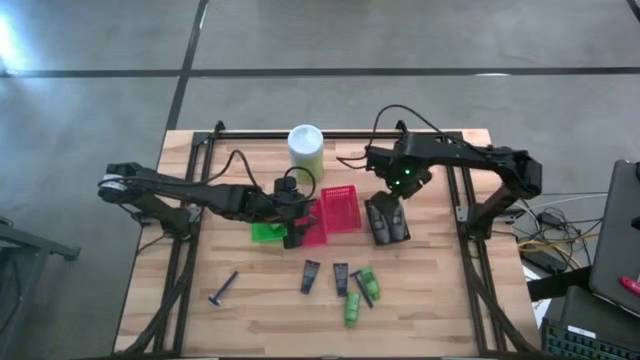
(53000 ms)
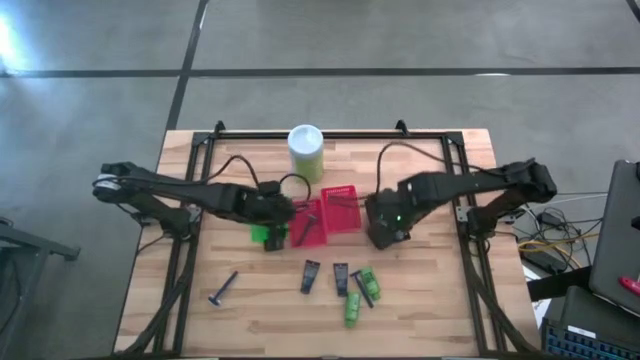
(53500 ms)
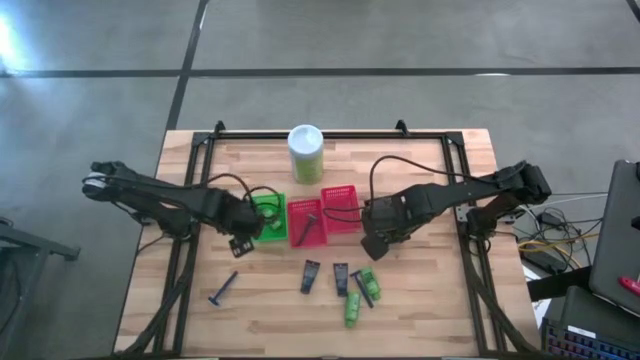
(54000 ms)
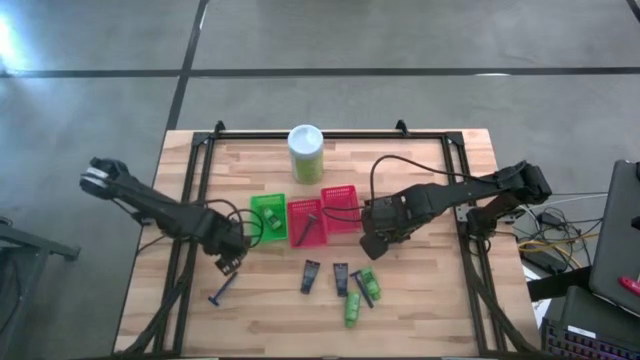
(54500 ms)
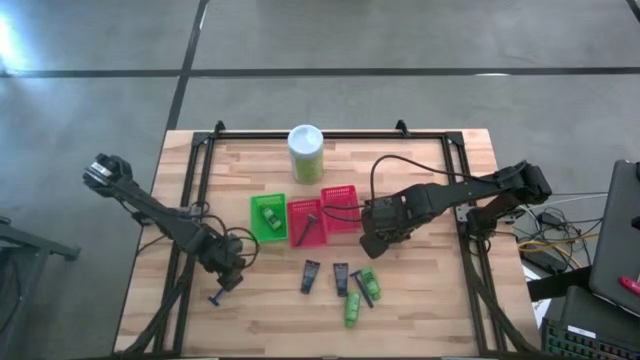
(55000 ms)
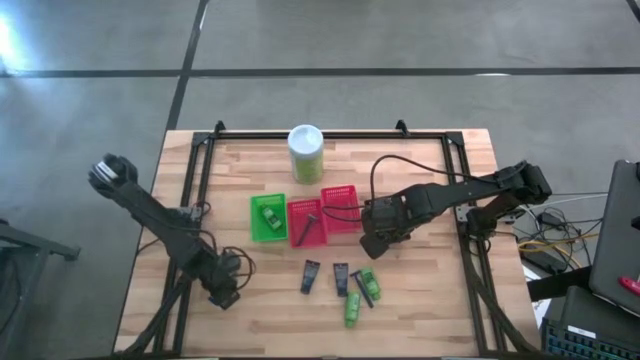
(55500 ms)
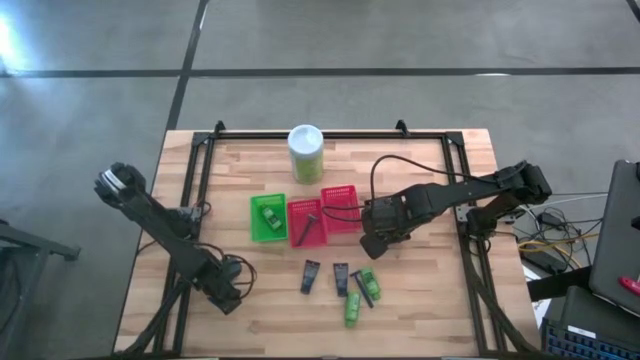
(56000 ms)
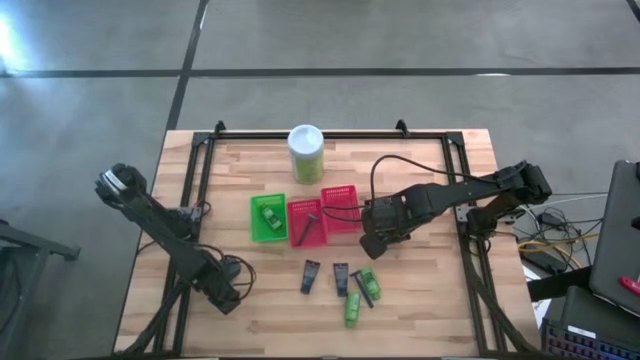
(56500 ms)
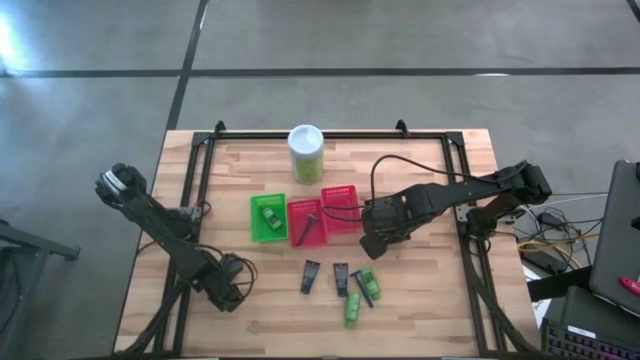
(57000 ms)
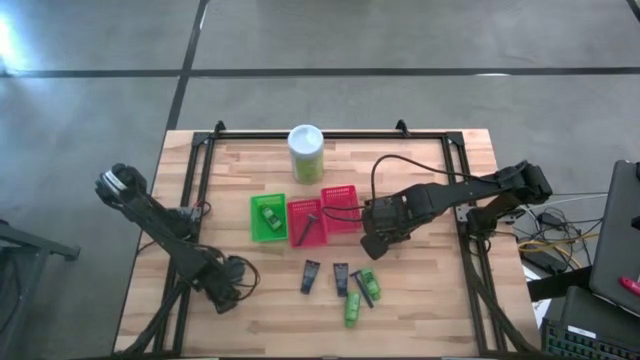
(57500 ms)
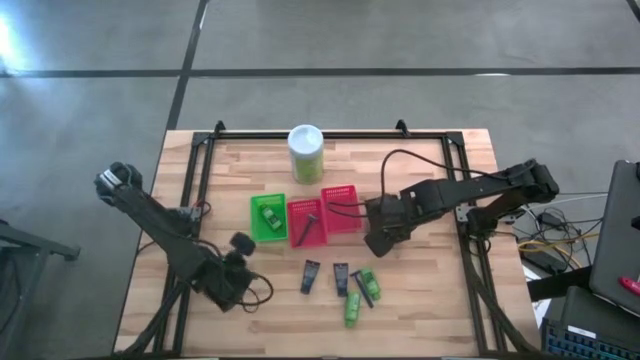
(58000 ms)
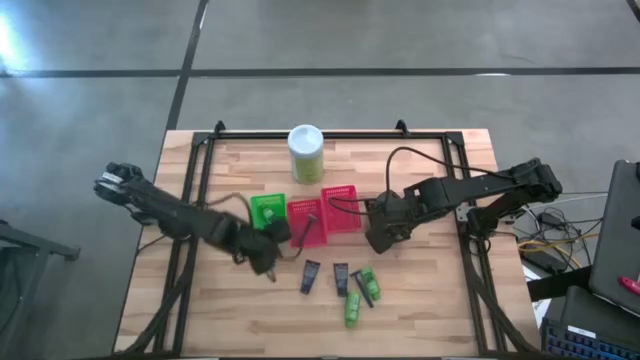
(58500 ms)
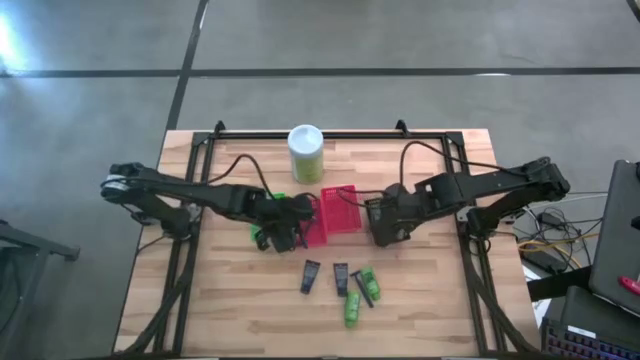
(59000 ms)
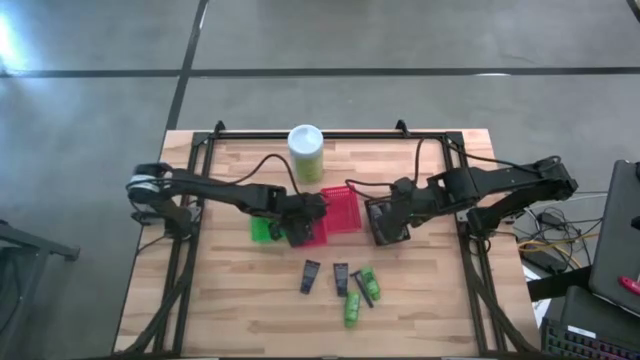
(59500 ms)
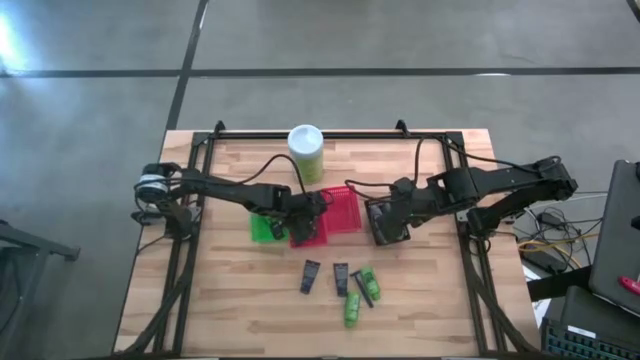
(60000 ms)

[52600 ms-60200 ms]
Task: Pick & Place Travel size toiletries
Put the blue razor into the left orange bin

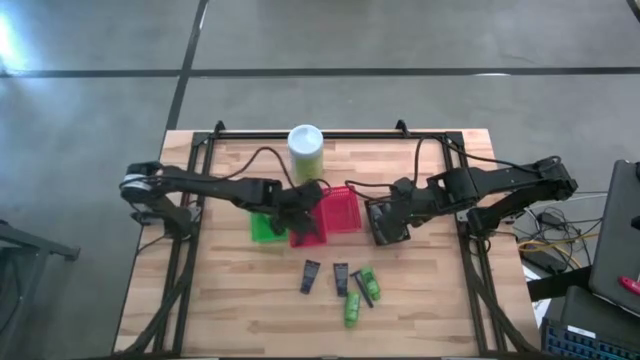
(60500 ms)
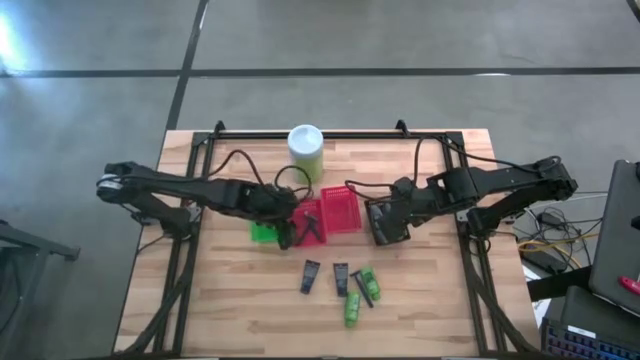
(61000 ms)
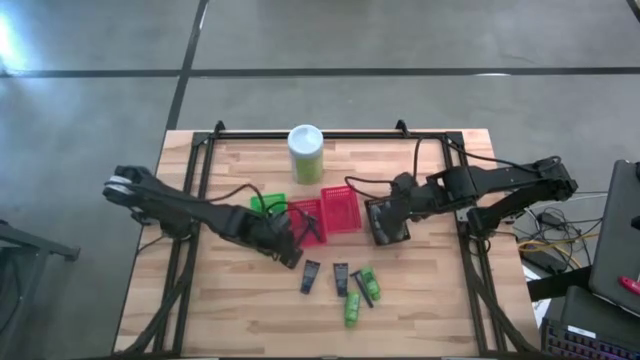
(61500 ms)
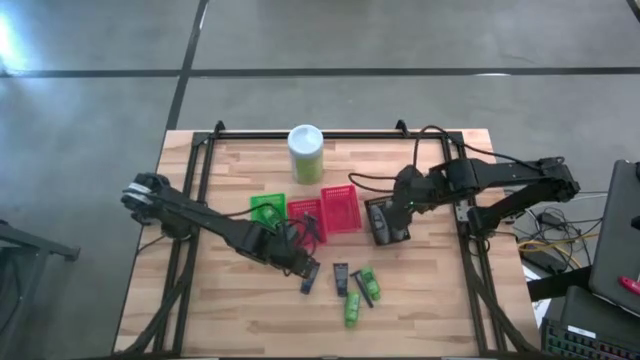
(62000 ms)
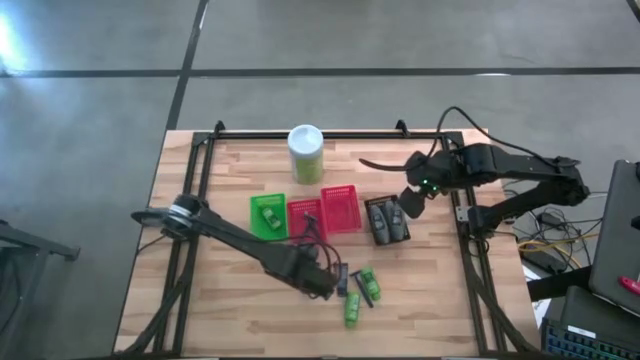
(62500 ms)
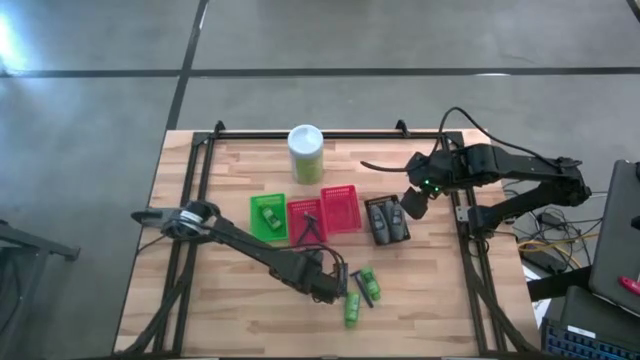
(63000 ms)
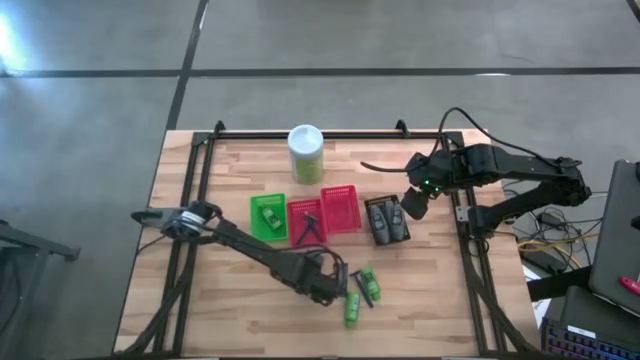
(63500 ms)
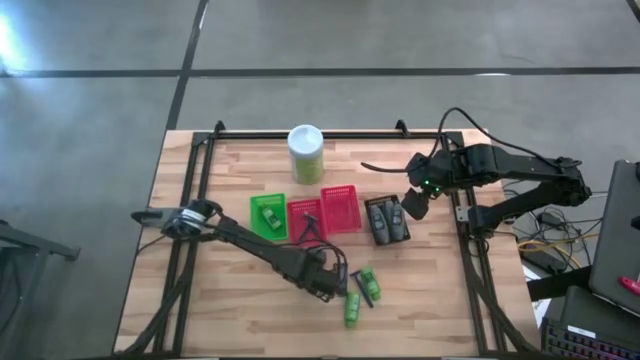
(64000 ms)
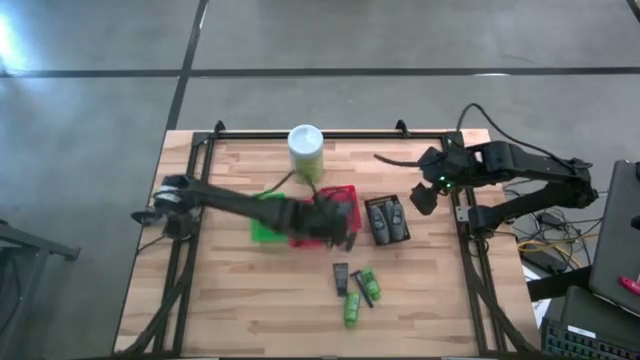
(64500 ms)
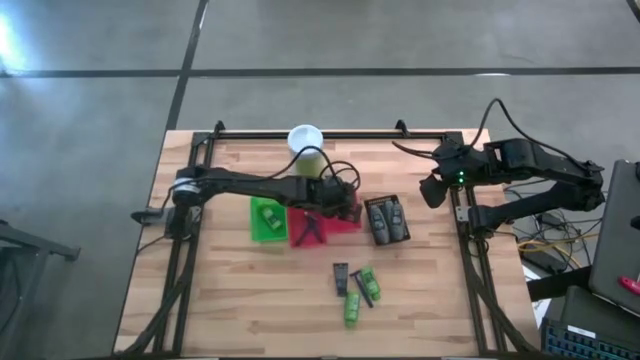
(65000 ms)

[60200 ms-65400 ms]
Put the blue shave cream into the right orange bin

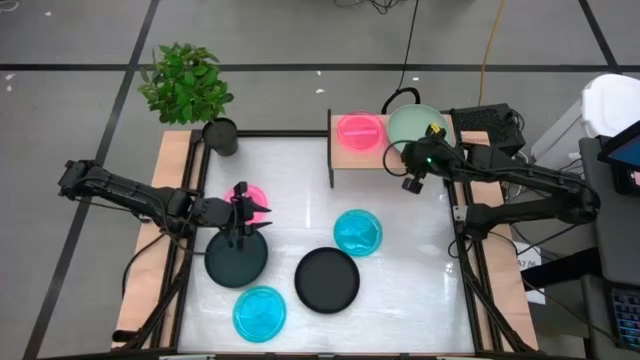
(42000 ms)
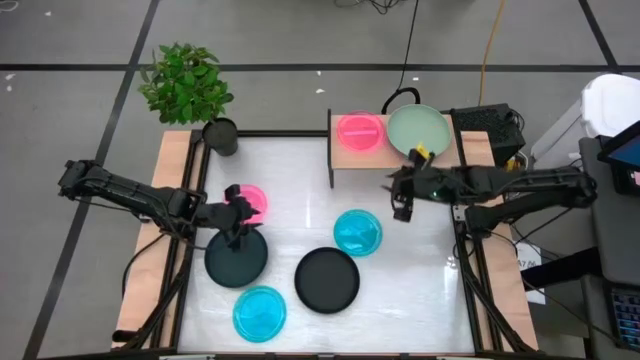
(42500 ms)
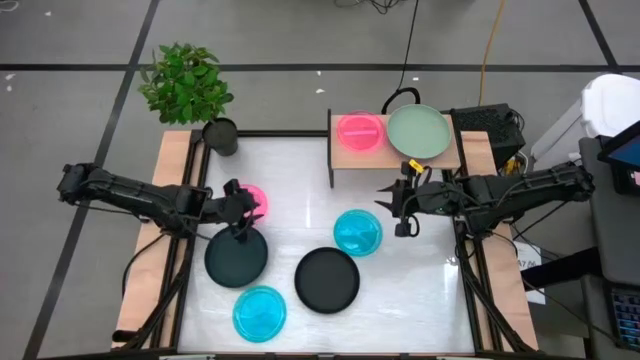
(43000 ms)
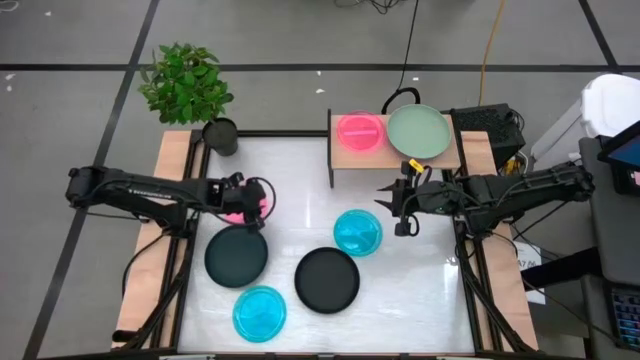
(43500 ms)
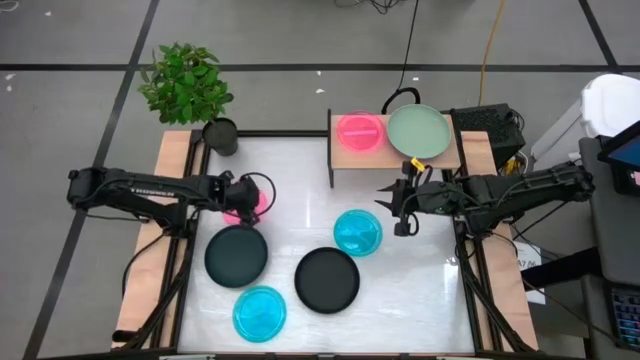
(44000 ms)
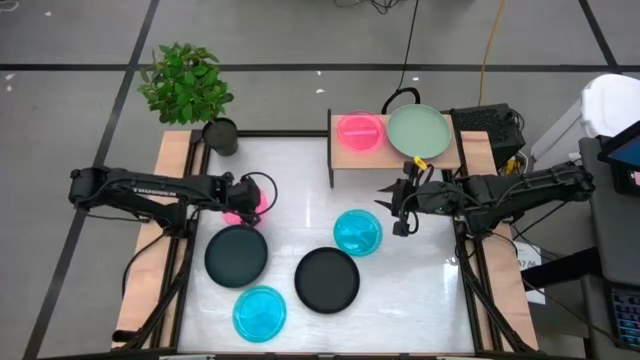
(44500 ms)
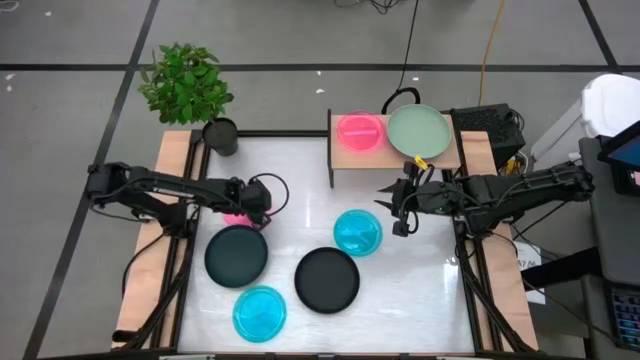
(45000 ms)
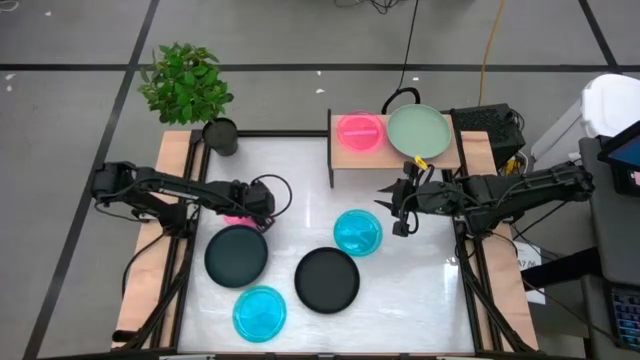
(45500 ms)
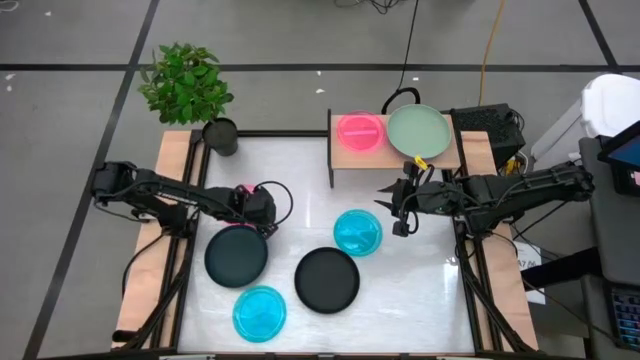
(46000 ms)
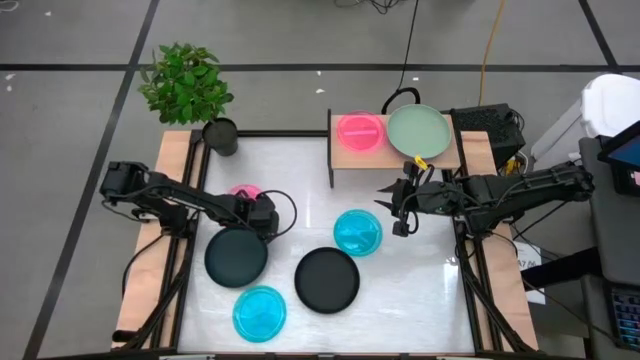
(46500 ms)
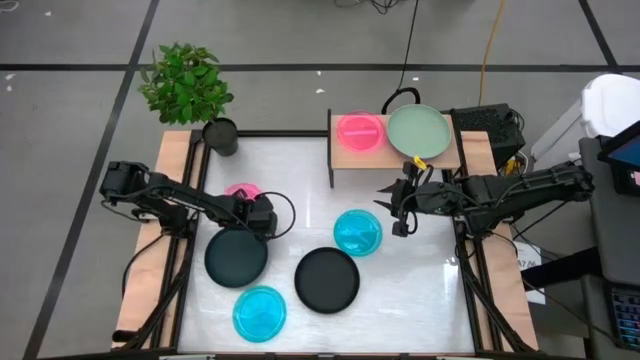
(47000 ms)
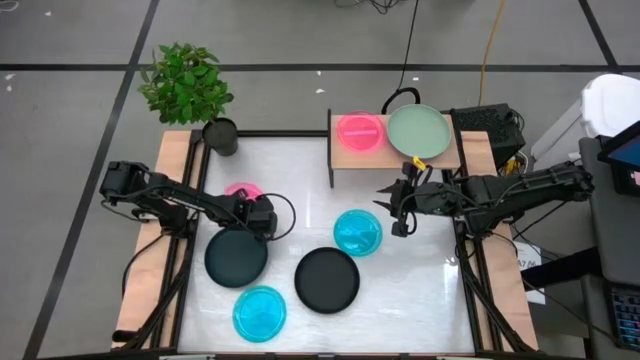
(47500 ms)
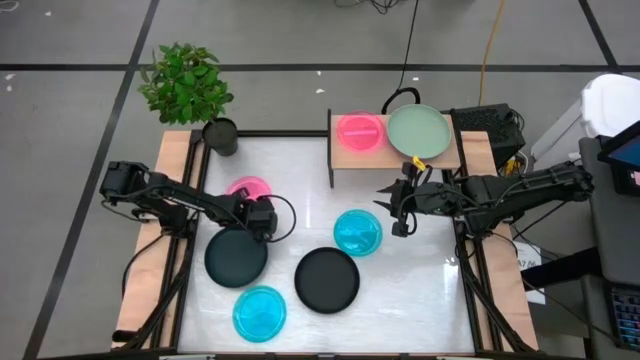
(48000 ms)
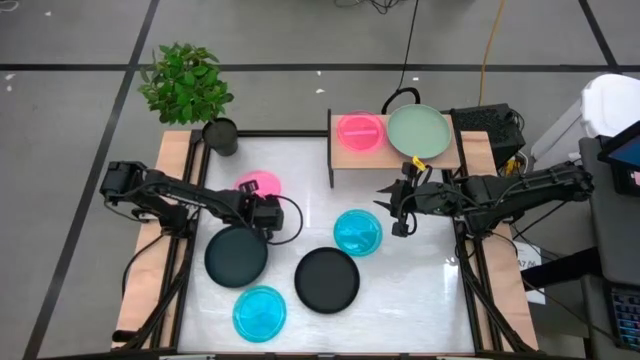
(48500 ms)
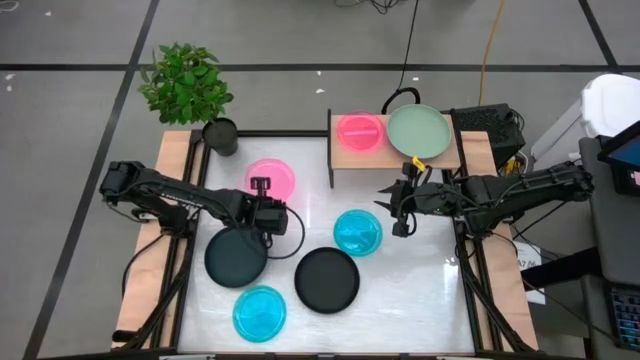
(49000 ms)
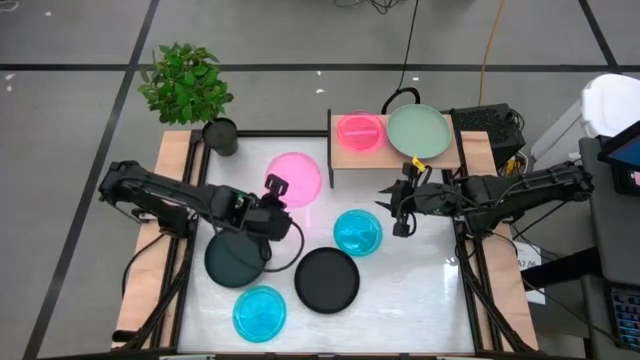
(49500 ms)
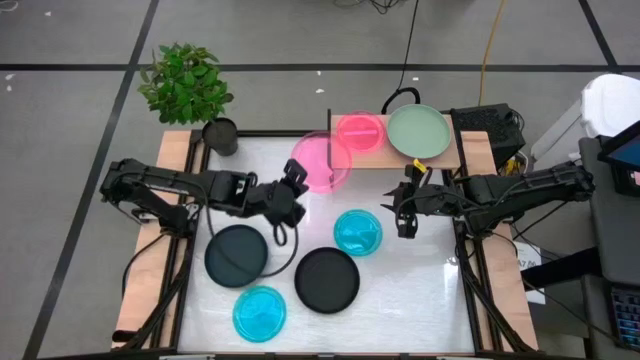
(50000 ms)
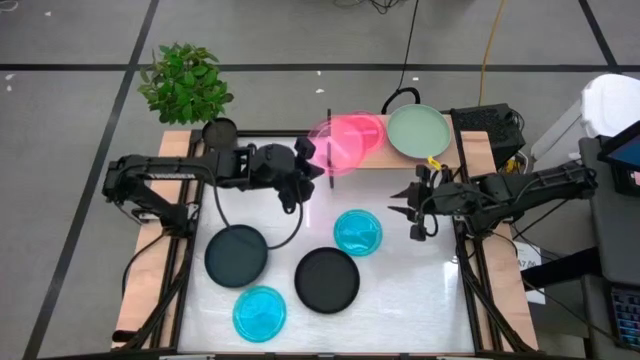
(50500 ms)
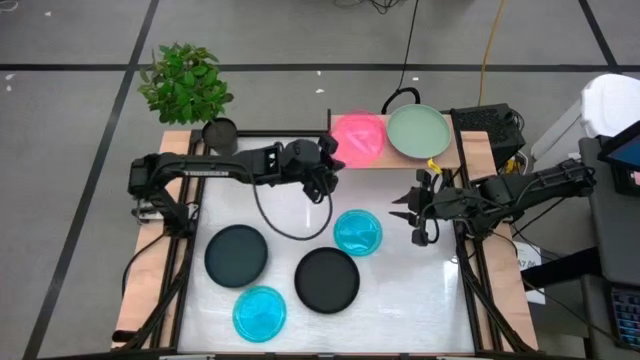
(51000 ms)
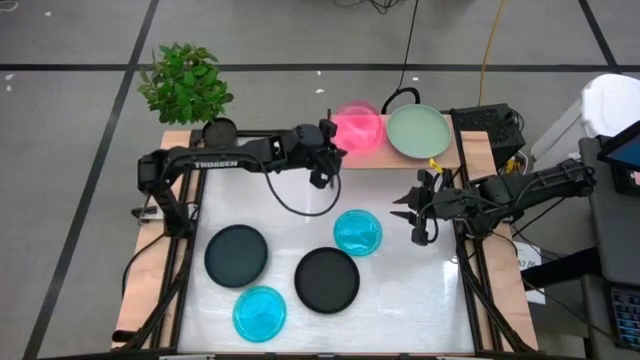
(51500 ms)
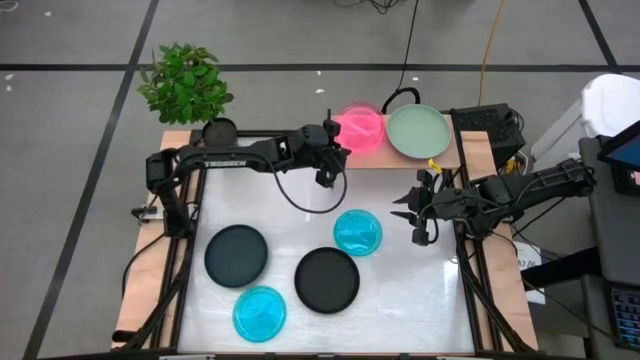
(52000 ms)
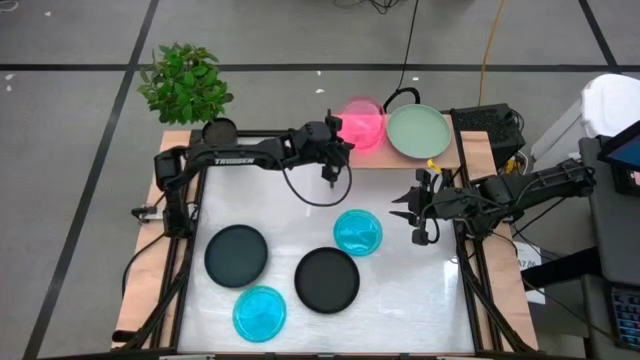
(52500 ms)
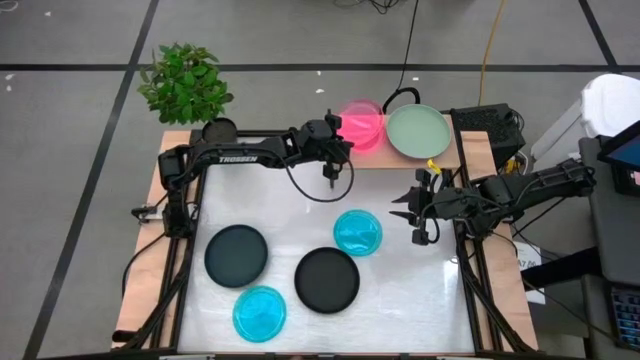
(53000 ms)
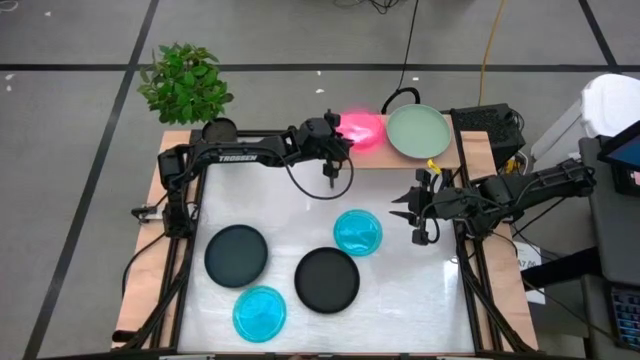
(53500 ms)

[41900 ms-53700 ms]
Task: Place and stack plates onto a shelf
Stack the pink plate on top of the other pink plate on the shelf
